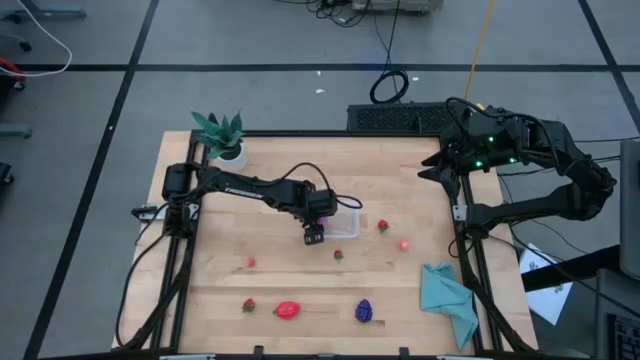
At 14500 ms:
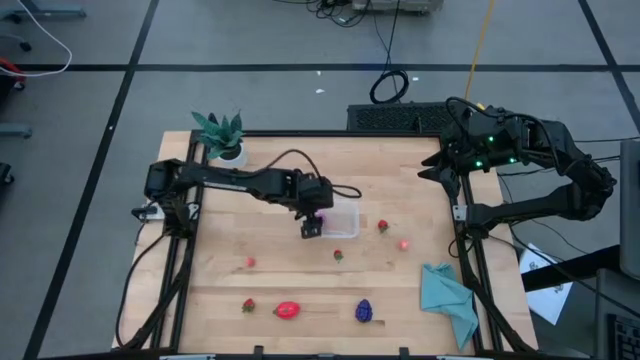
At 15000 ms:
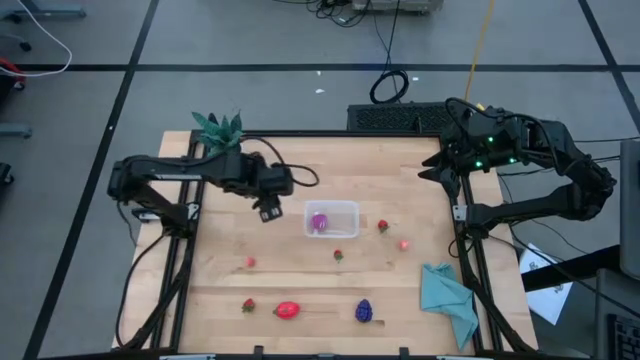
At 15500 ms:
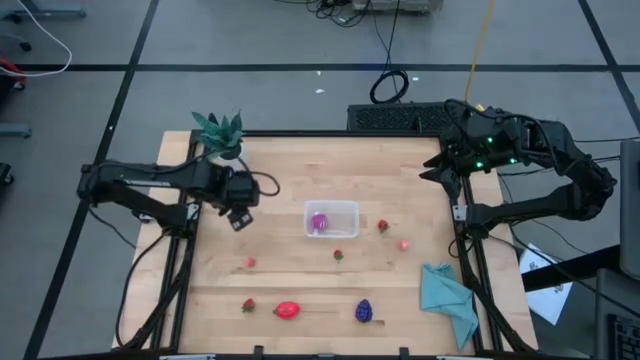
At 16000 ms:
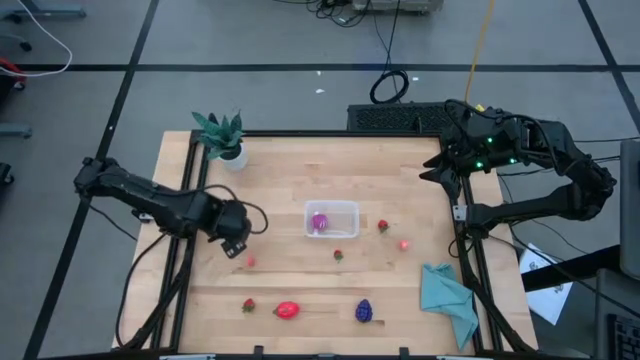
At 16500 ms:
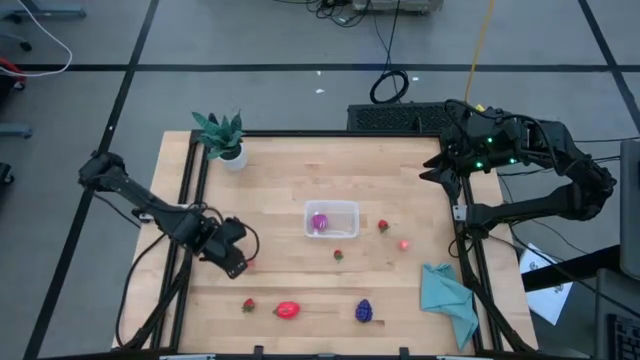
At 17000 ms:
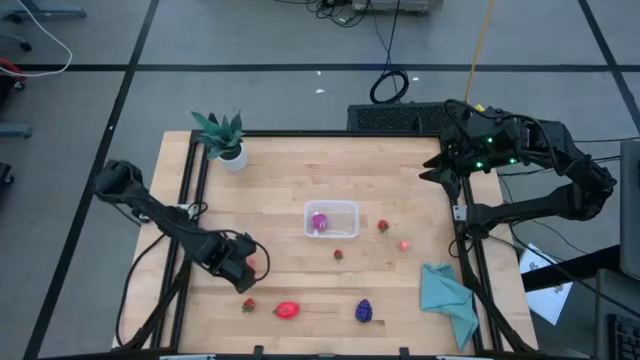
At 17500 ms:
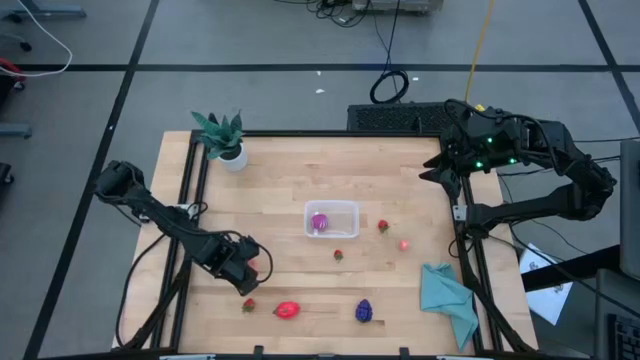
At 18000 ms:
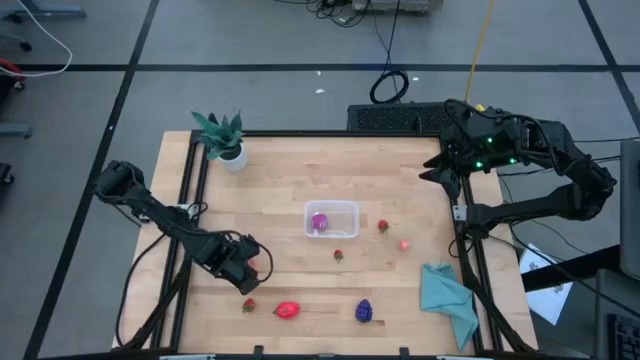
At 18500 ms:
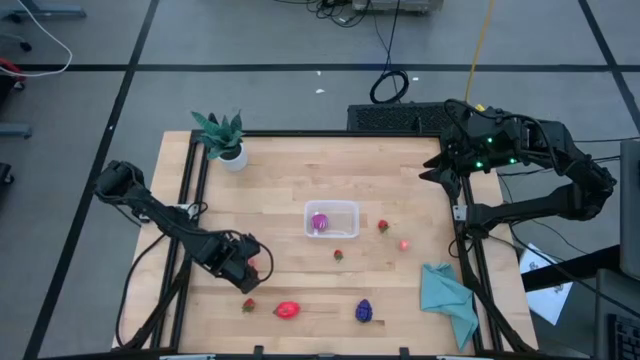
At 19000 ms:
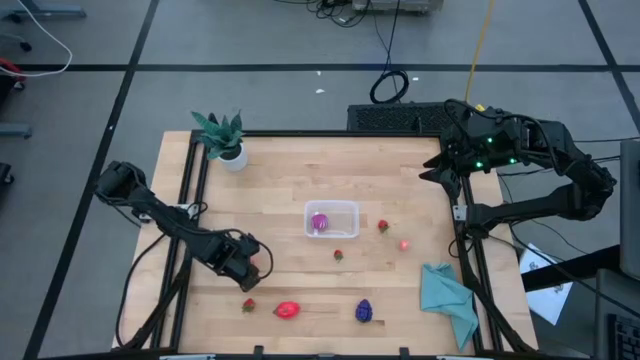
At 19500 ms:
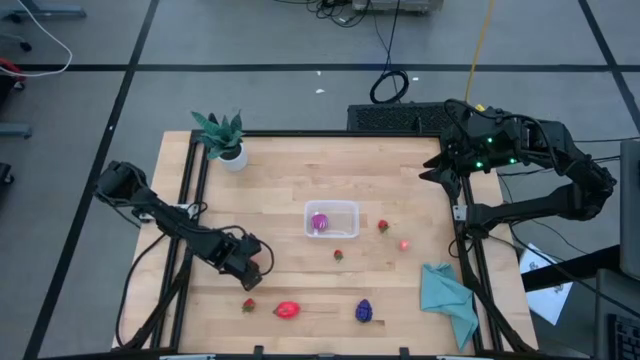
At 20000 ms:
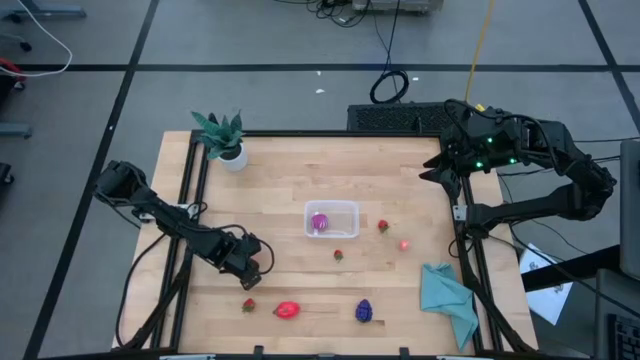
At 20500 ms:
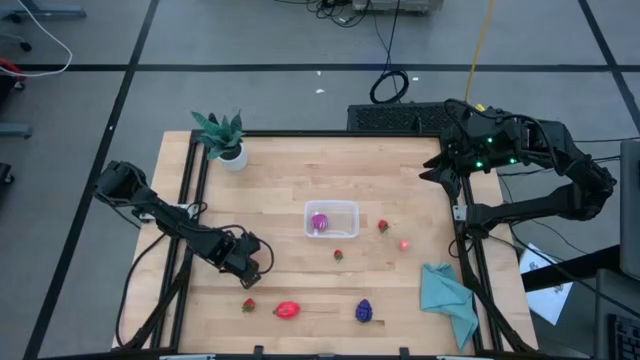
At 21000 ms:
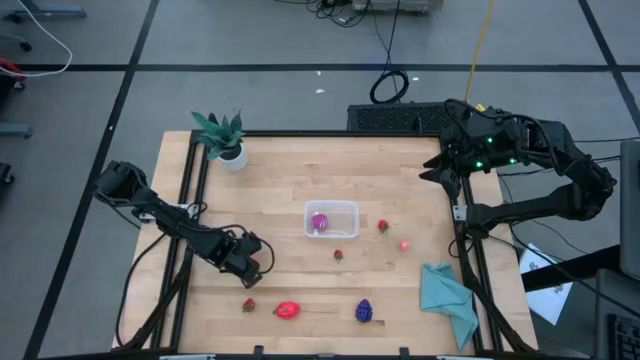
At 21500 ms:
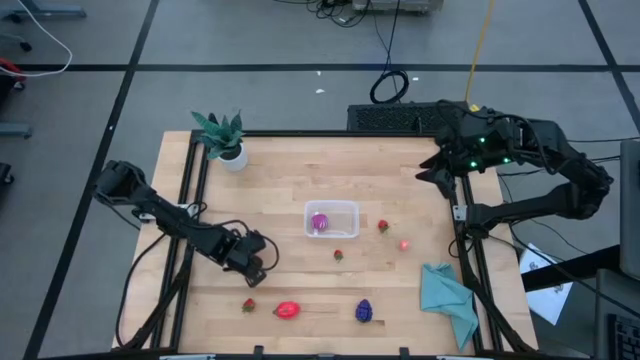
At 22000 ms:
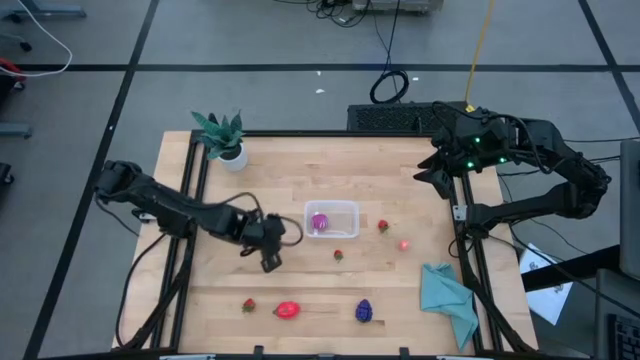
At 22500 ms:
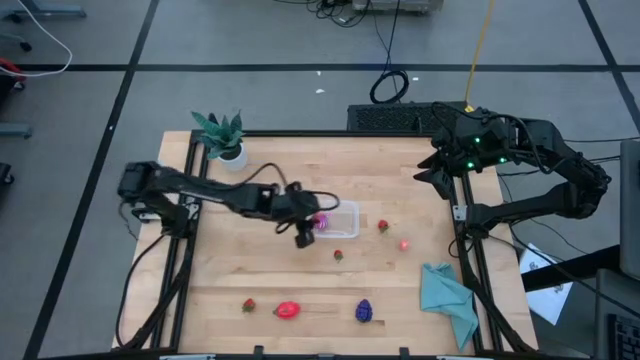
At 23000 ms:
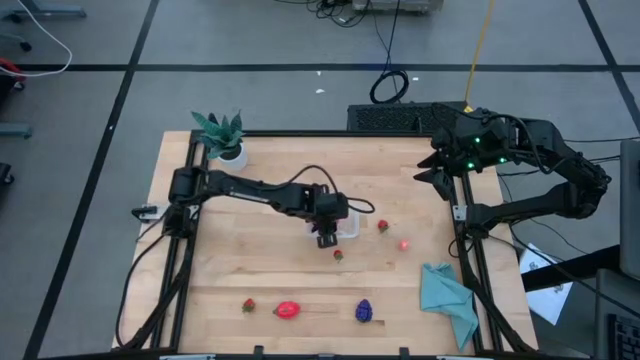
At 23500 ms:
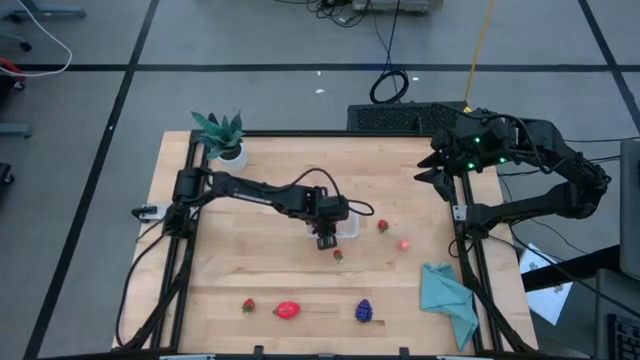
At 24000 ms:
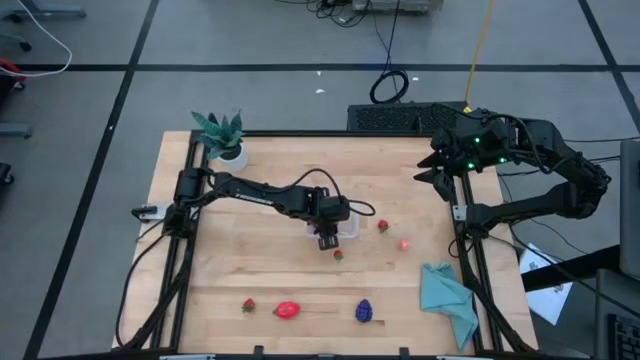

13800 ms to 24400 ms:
Task: Pick and placing Produce into tupperware
Put the left pink peach into the transparent bin

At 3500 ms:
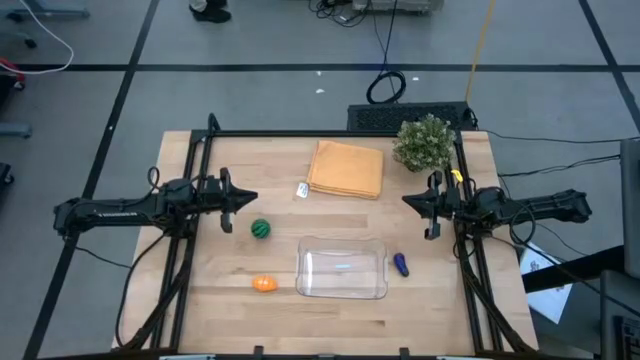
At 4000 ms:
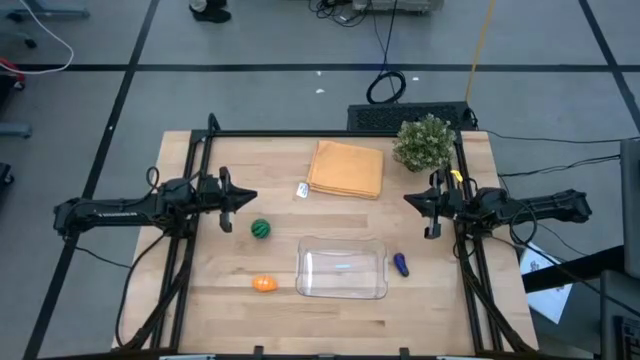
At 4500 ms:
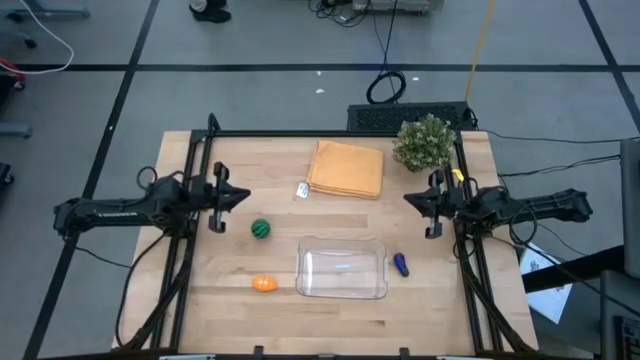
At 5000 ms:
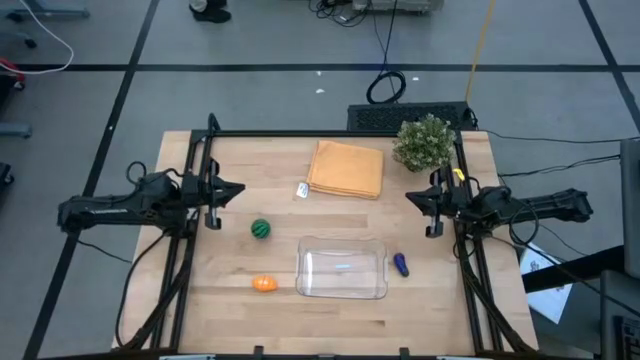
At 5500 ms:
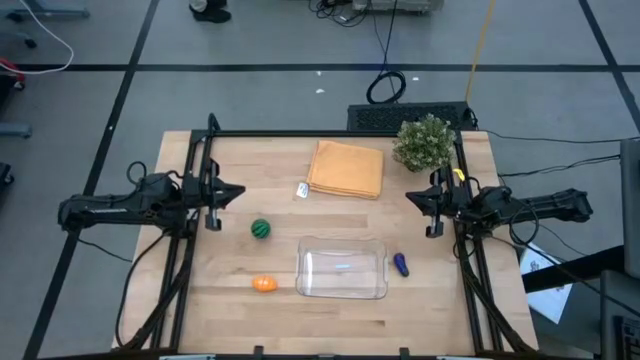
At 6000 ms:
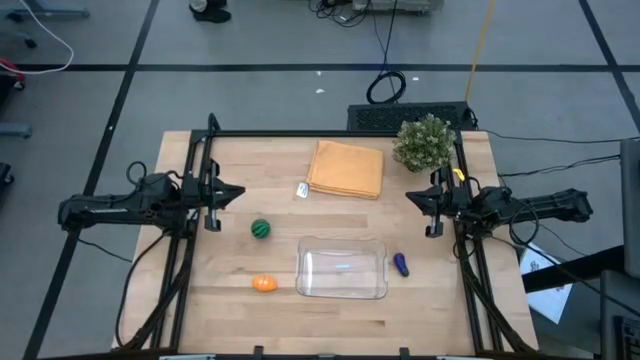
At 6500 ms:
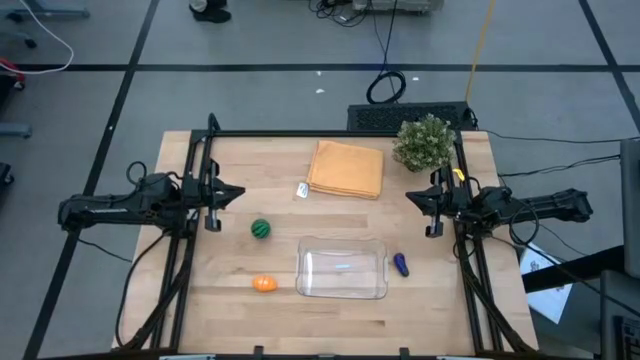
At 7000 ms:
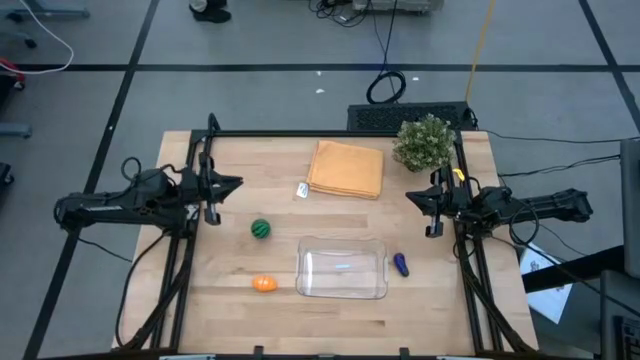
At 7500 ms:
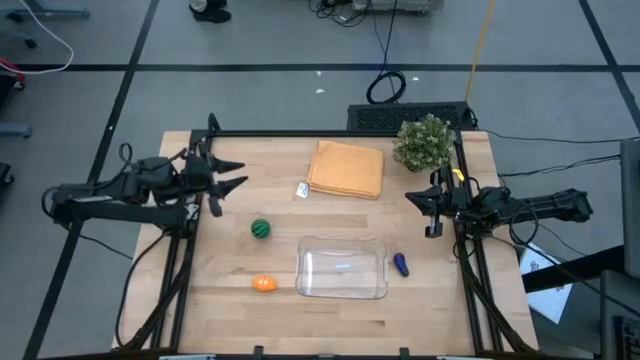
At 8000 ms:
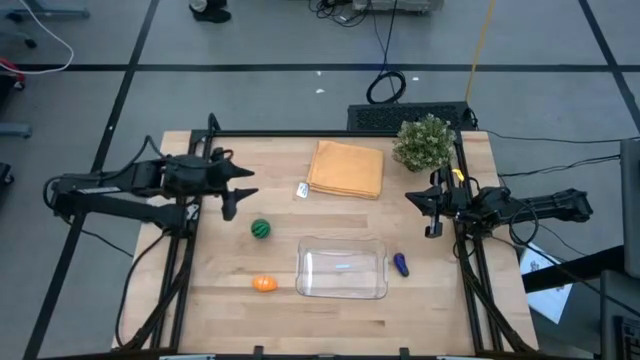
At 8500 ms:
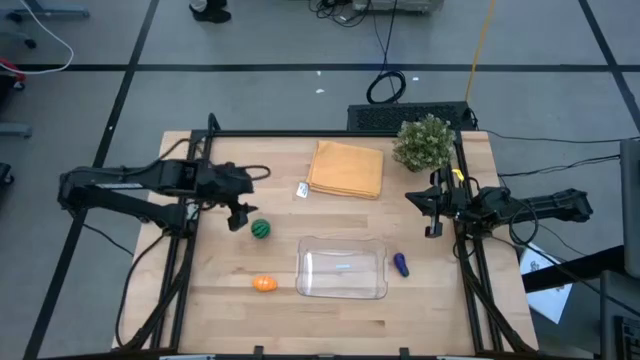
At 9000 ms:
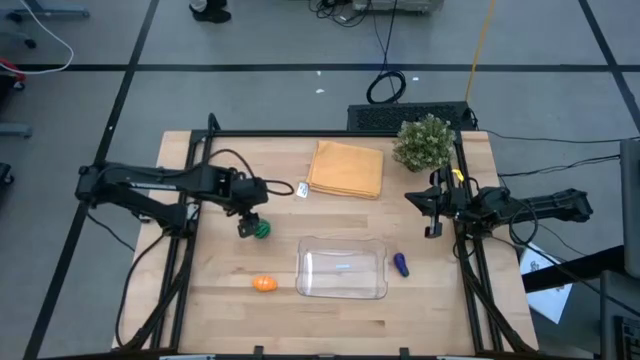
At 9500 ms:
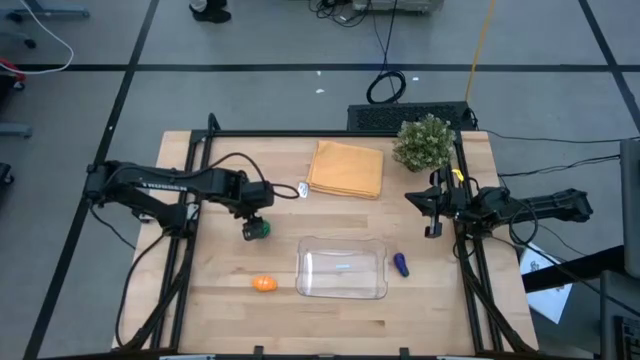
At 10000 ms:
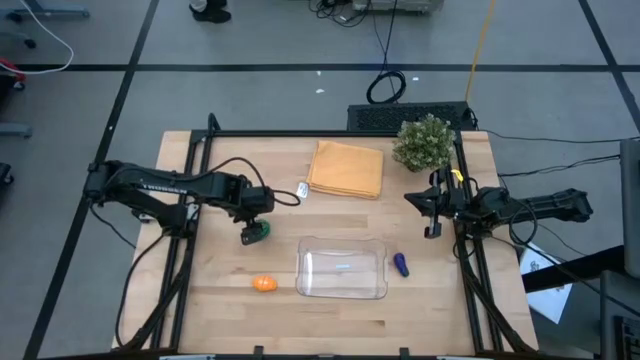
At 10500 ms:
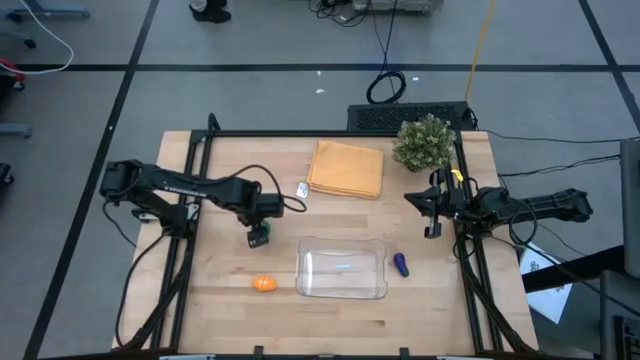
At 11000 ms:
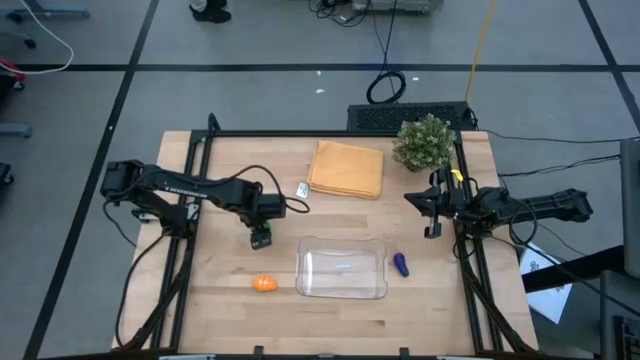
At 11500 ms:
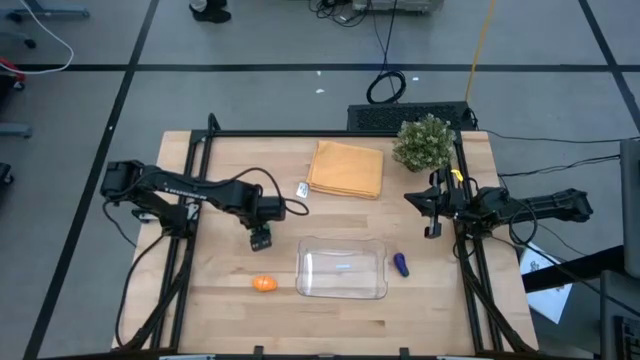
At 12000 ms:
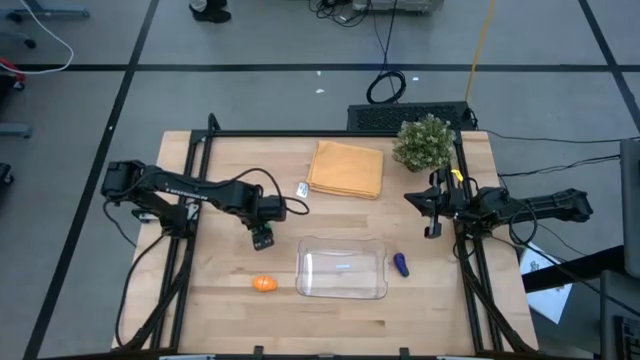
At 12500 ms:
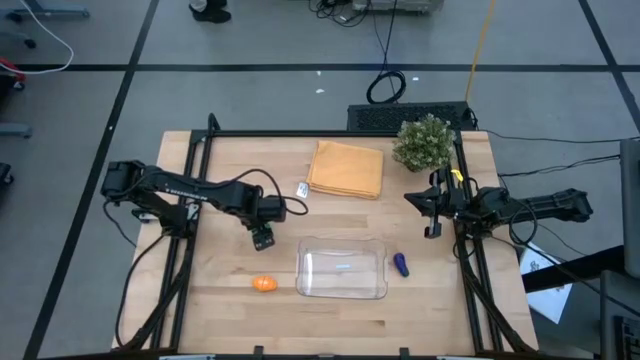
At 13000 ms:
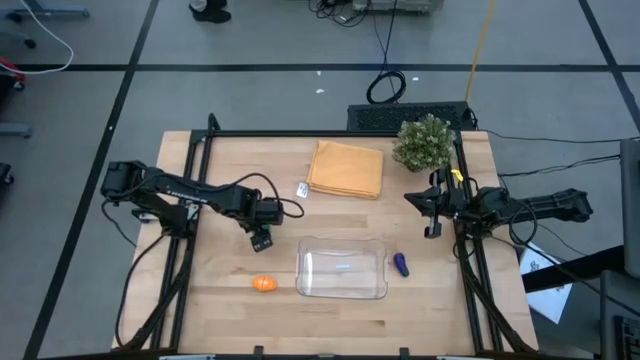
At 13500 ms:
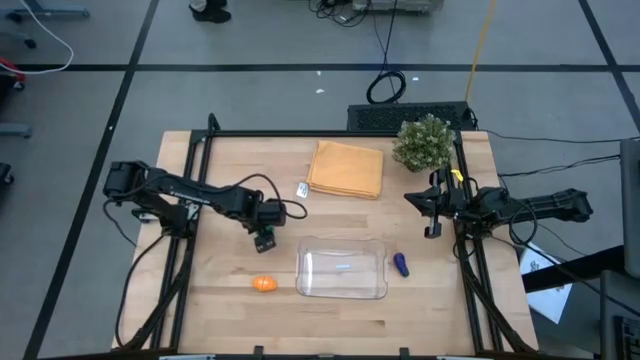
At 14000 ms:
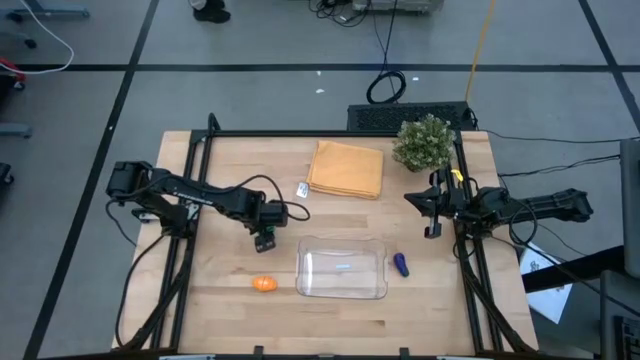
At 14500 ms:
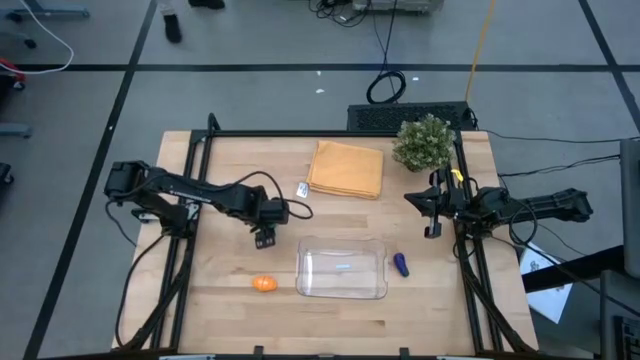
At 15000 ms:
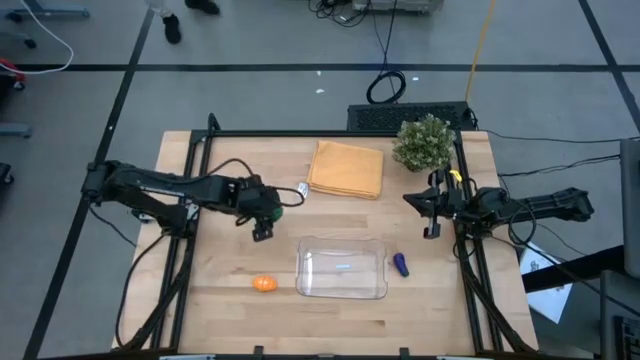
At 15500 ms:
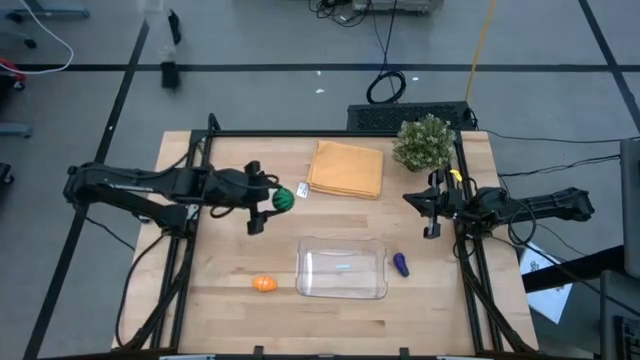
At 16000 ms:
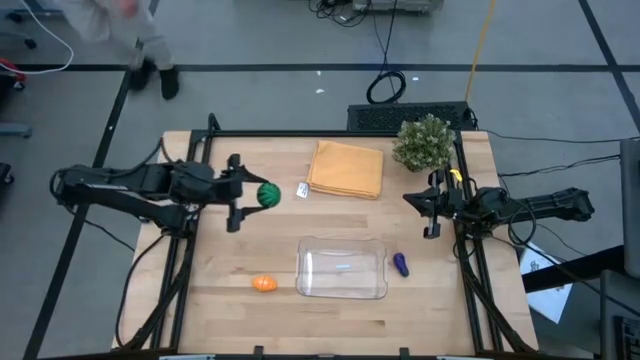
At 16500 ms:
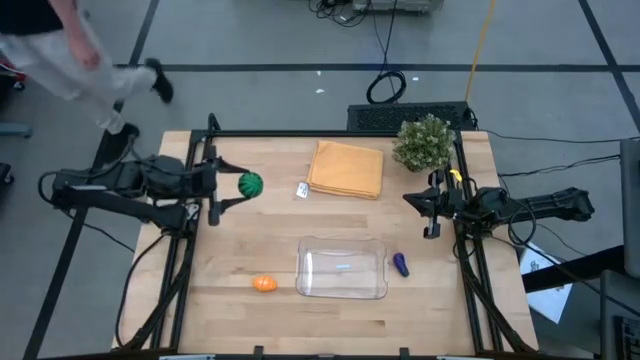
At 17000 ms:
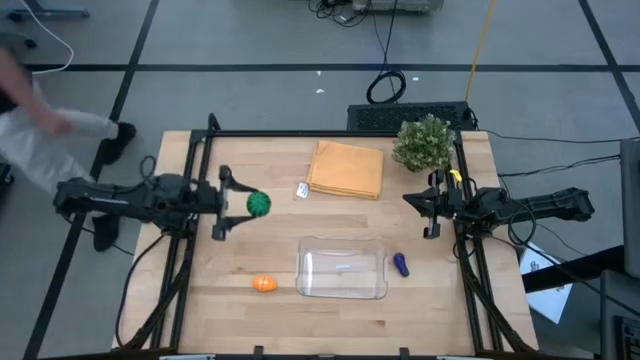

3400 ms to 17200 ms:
Task: Pick and placing Produce into tupperware
Put the watermelon into the transparent bin
